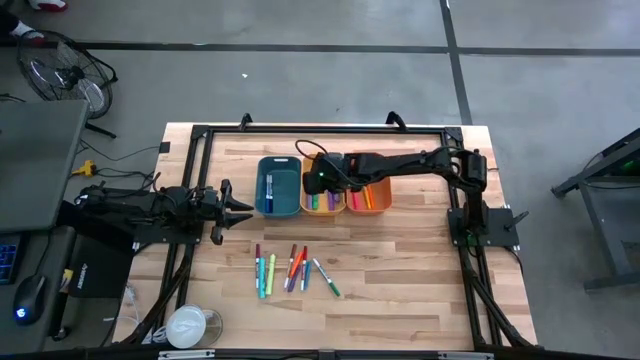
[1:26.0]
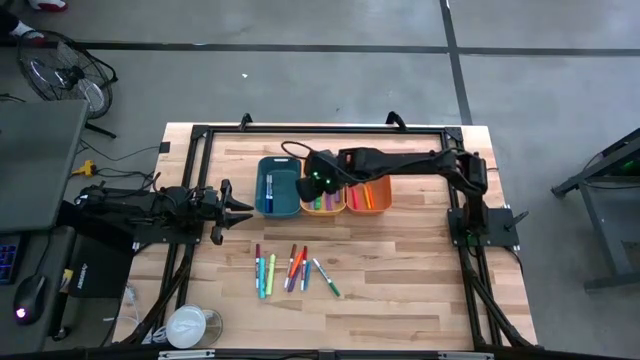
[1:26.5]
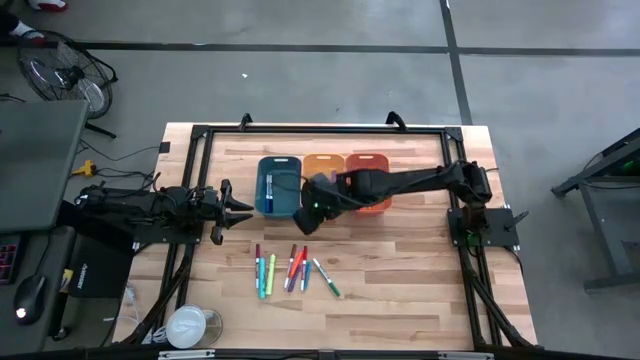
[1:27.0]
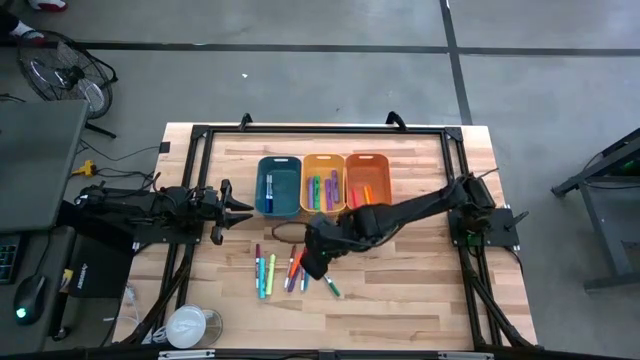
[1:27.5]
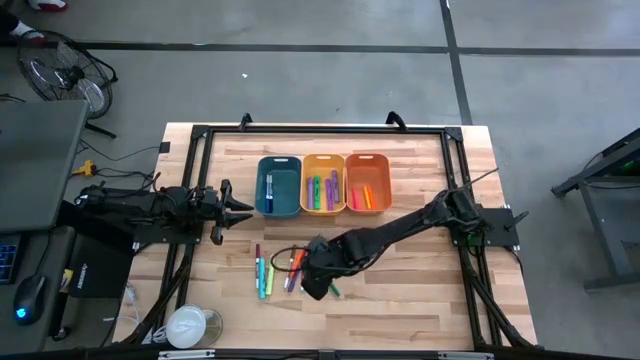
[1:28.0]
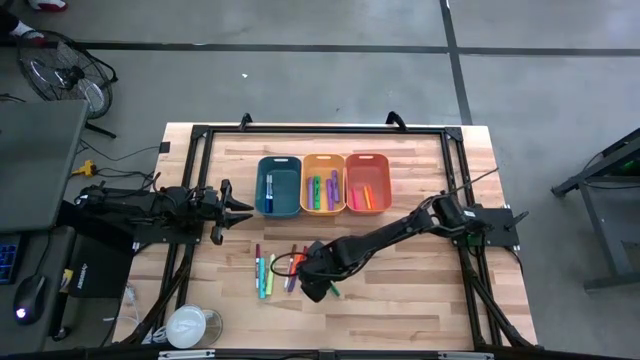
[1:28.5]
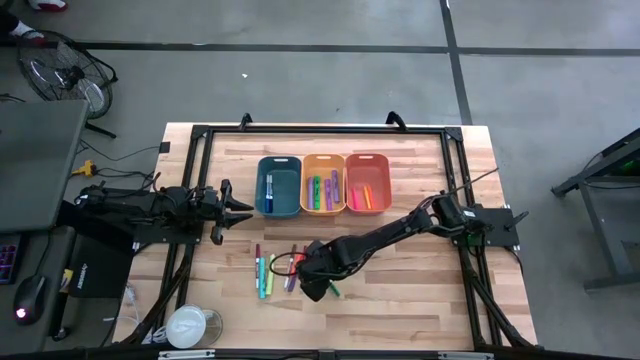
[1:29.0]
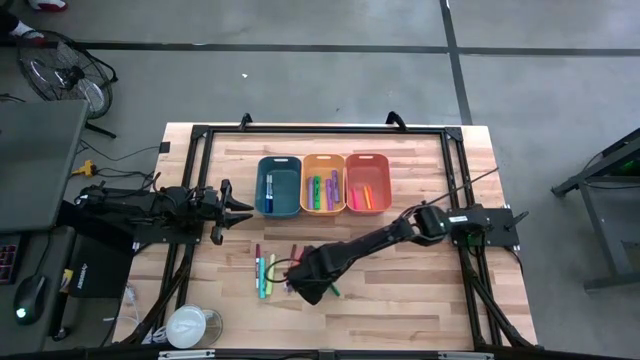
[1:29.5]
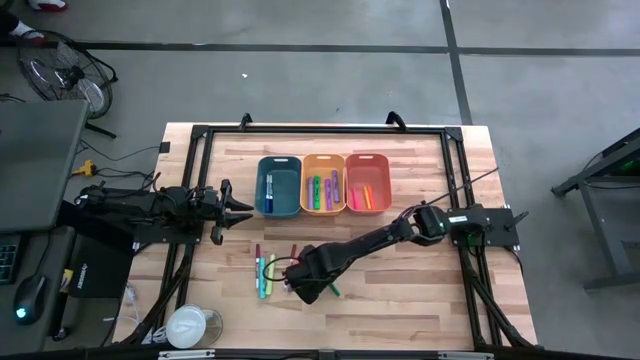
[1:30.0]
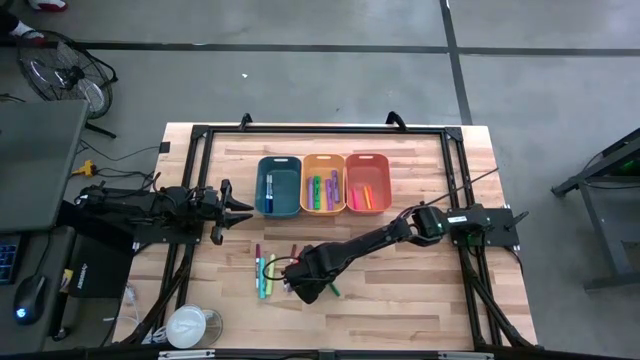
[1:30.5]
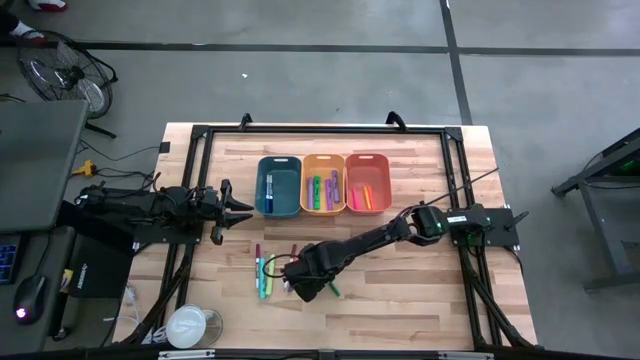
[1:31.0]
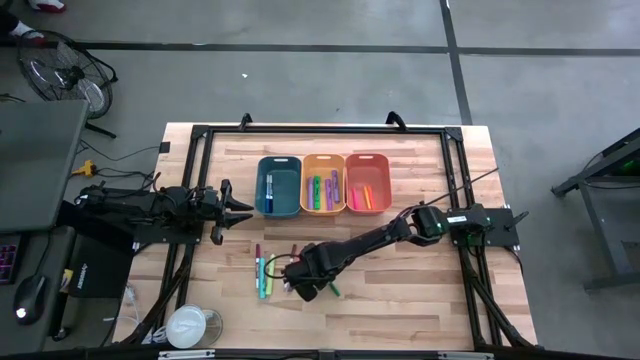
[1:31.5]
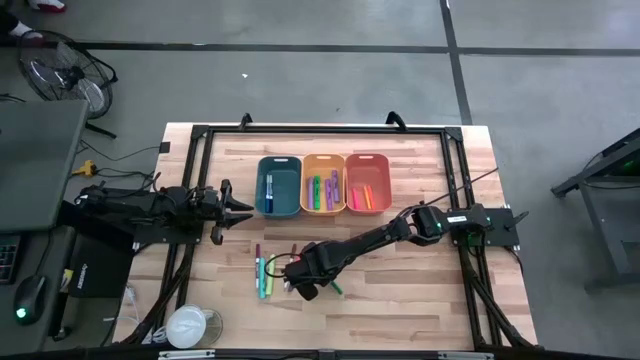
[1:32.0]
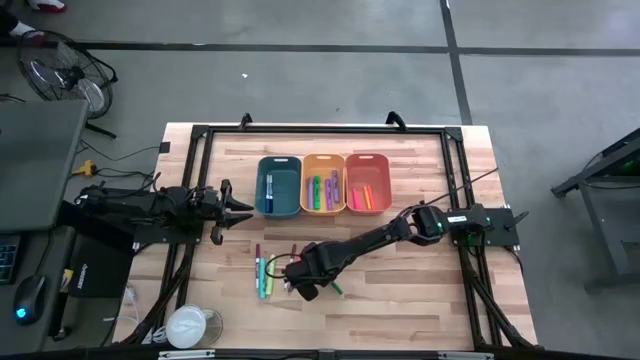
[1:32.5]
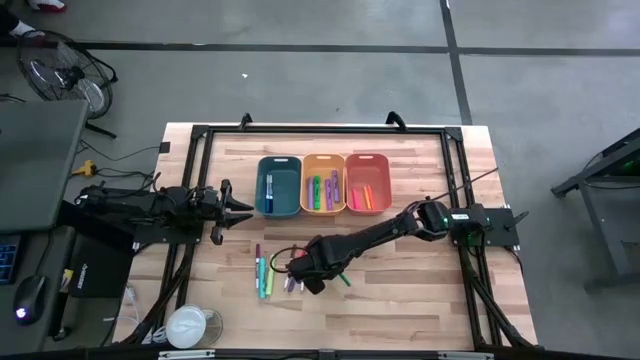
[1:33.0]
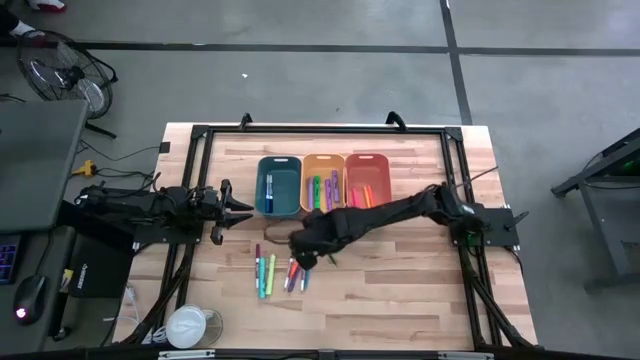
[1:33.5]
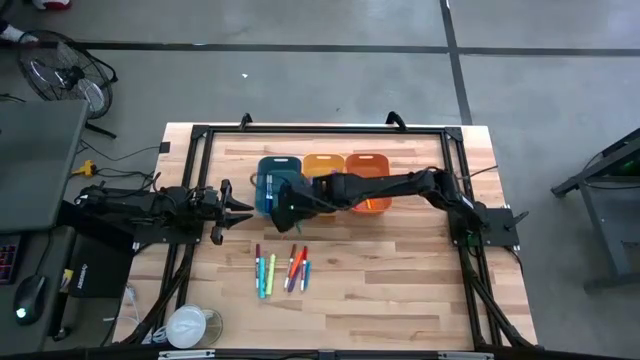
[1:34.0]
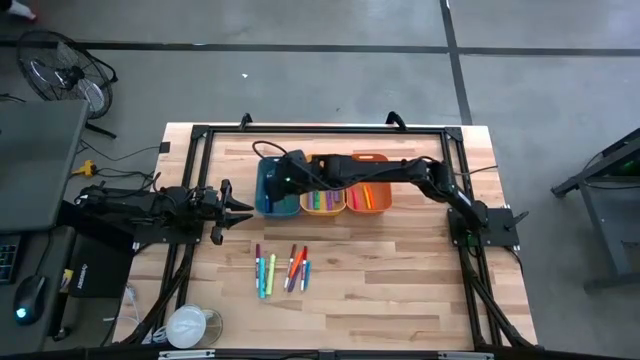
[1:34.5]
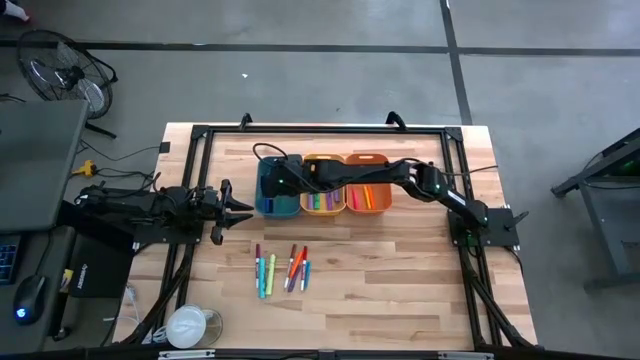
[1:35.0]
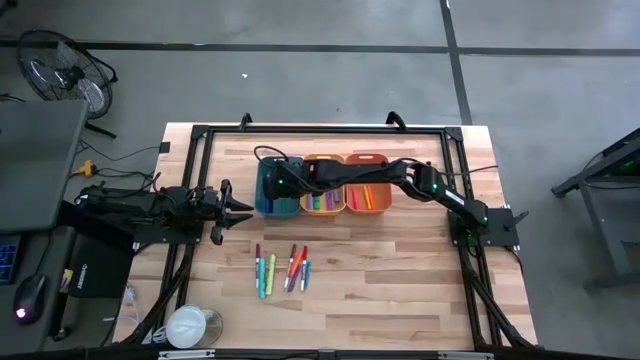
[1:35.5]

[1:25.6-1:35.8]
Task: Pick & Place Markers
Put the green marker pen into the blue bin

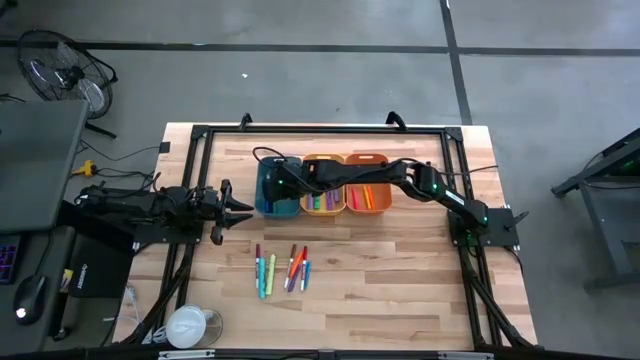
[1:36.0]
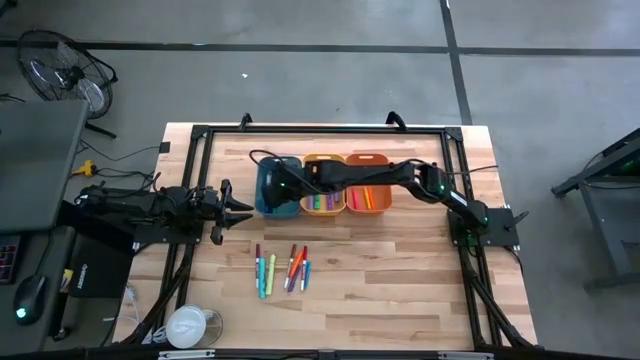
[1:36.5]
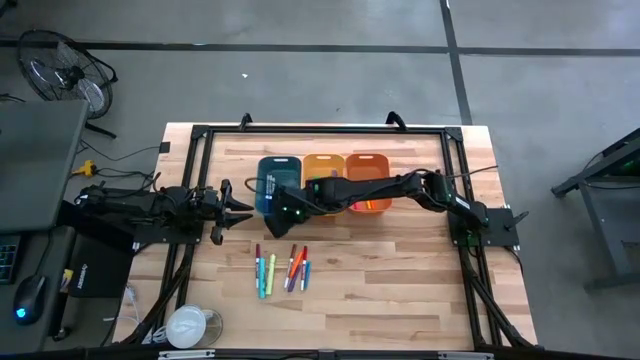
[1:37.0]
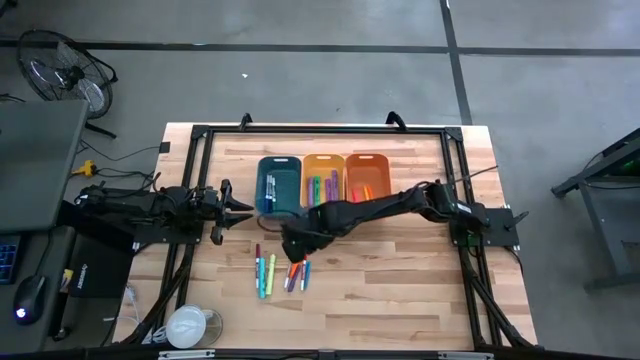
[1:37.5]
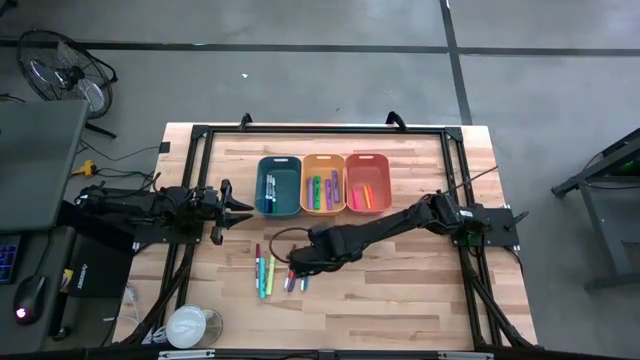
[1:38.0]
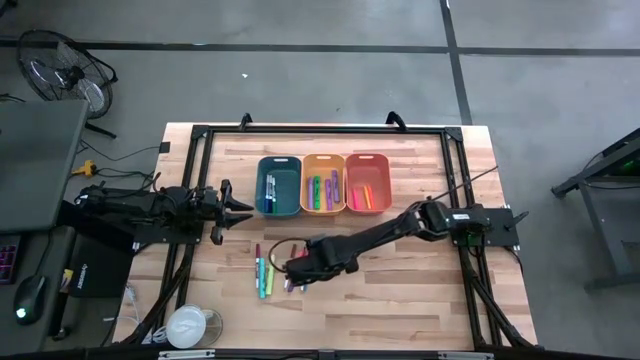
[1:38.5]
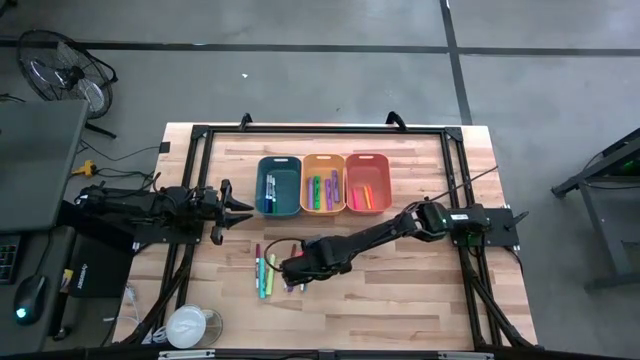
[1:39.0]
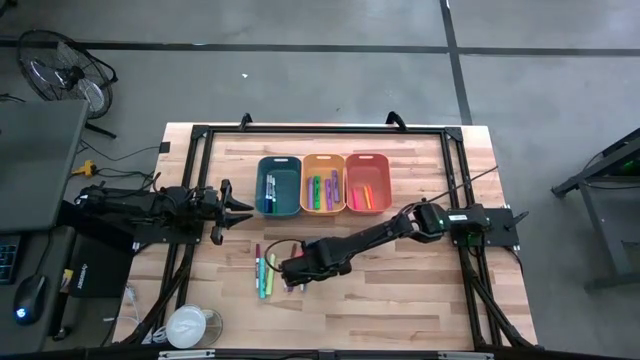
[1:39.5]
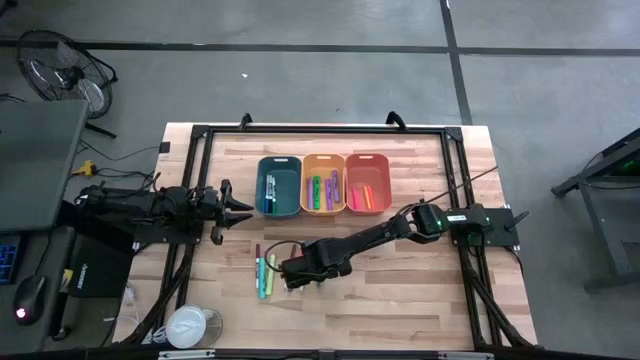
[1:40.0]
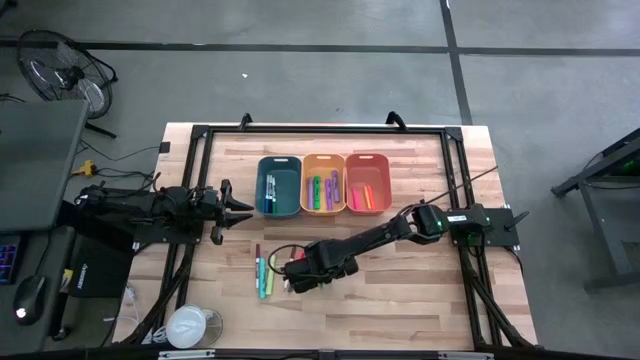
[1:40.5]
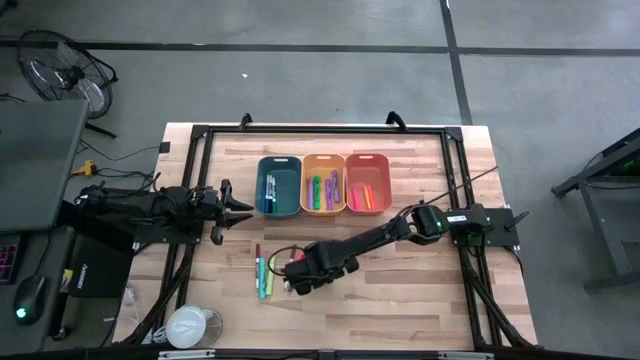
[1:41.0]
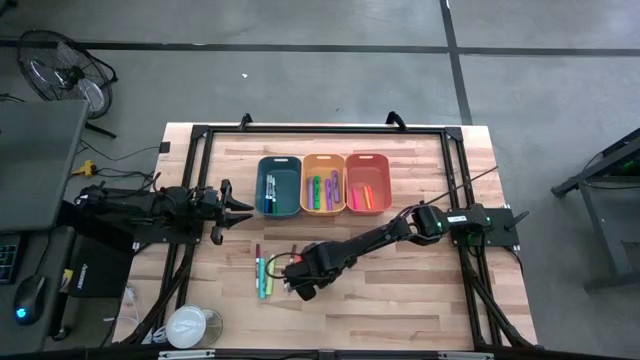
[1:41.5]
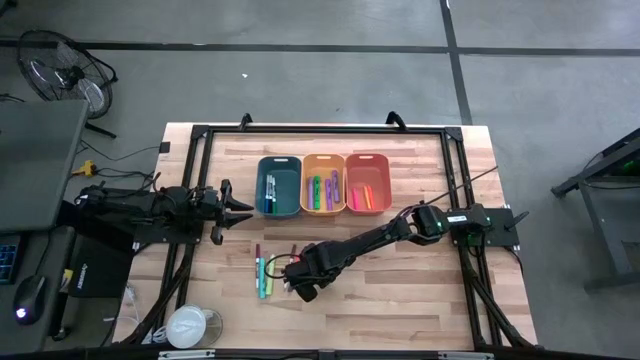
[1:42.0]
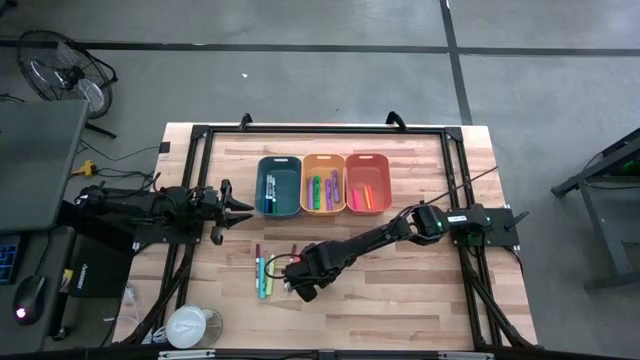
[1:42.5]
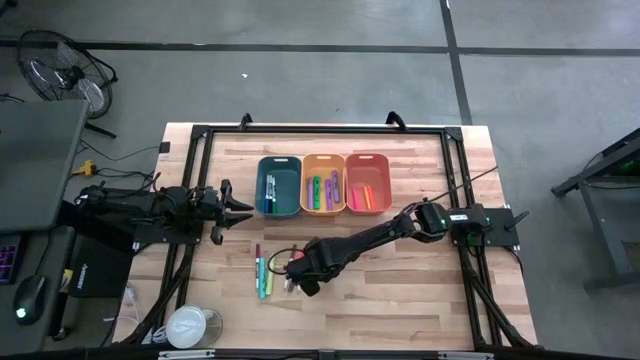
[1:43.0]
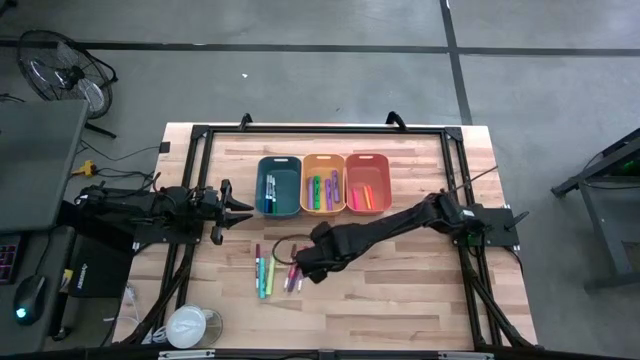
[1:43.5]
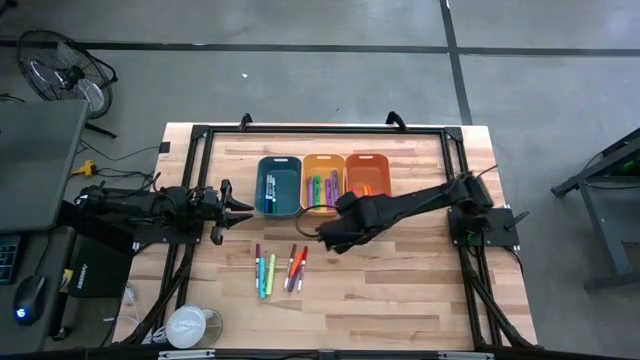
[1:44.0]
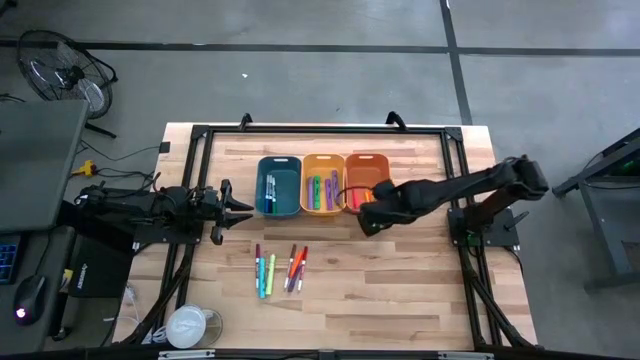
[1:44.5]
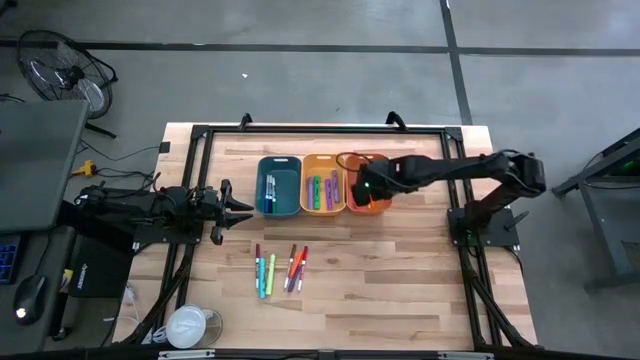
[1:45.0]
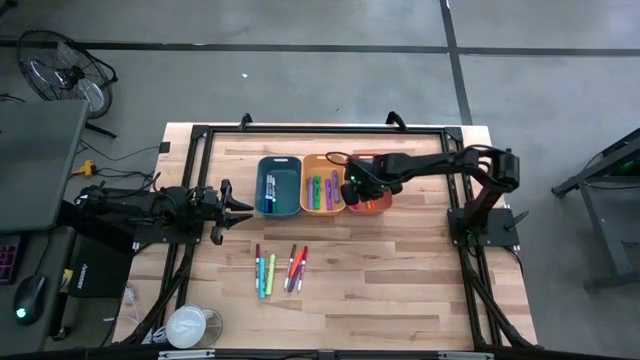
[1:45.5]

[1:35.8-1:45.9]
Put the blue pen into the orange bin

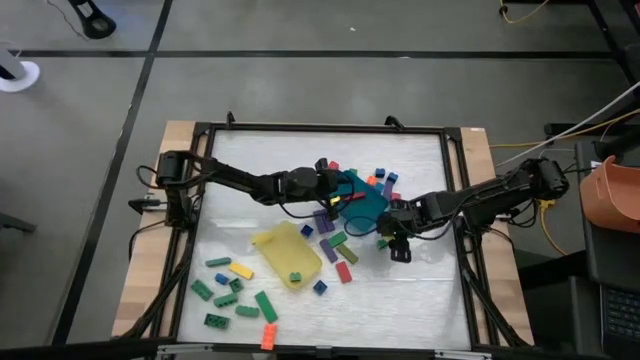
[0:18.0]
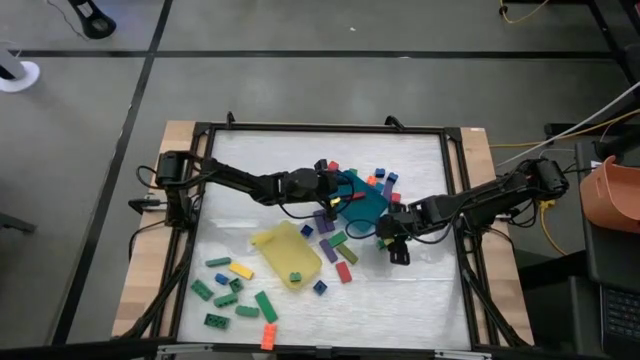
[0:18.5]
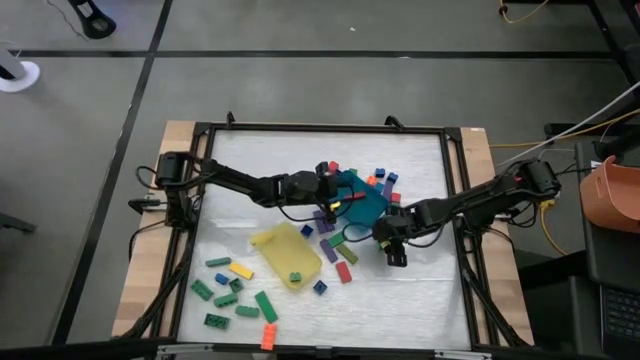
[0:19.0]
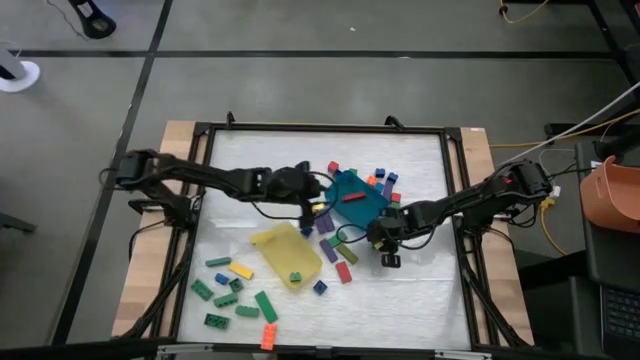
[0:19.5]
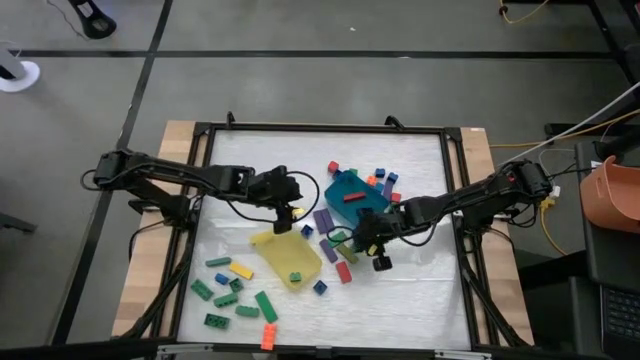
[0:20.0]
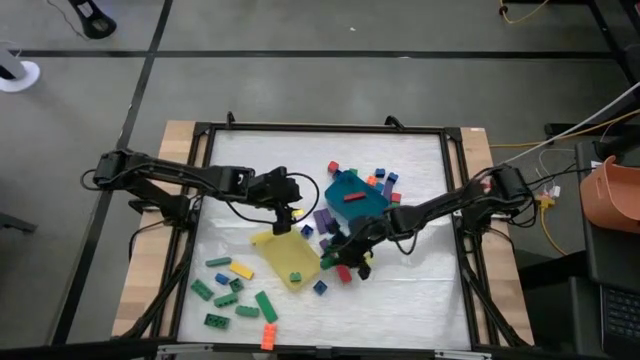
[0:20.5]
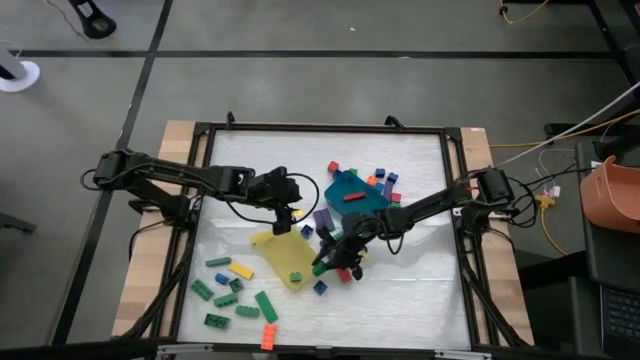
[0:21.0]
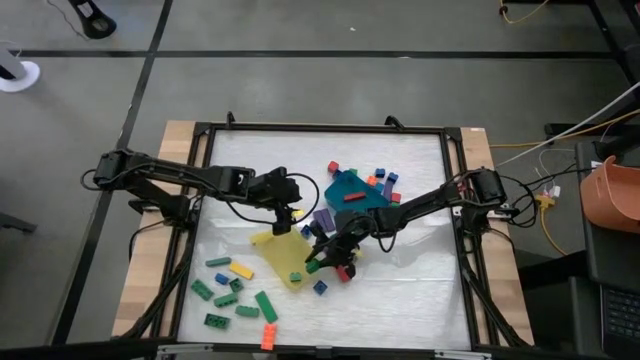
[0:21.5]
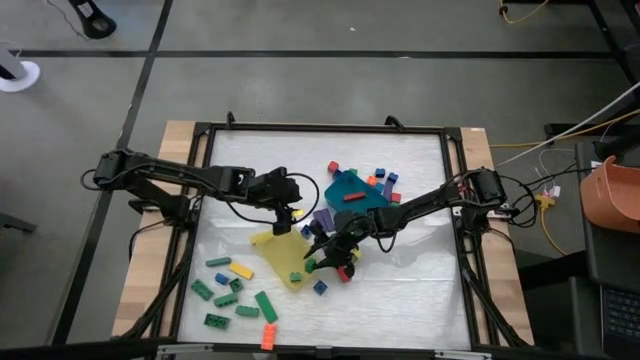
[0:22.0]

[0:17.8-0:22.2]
Task: Sort blocks by size
Put the small green game piece into the yellow bin
